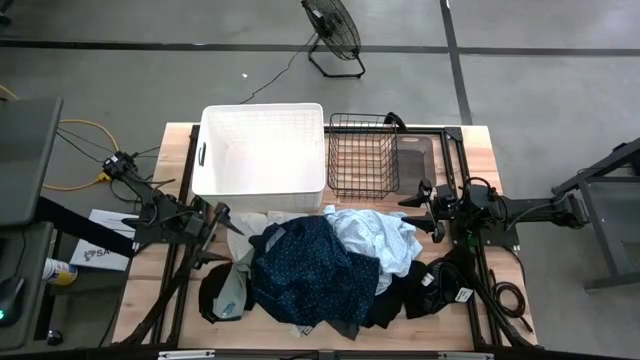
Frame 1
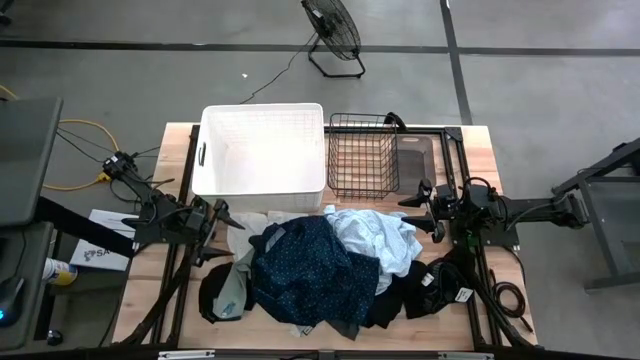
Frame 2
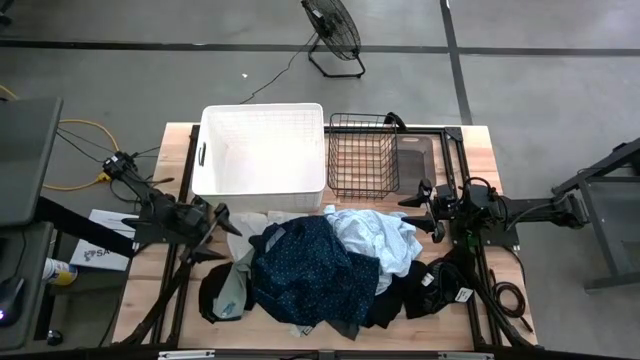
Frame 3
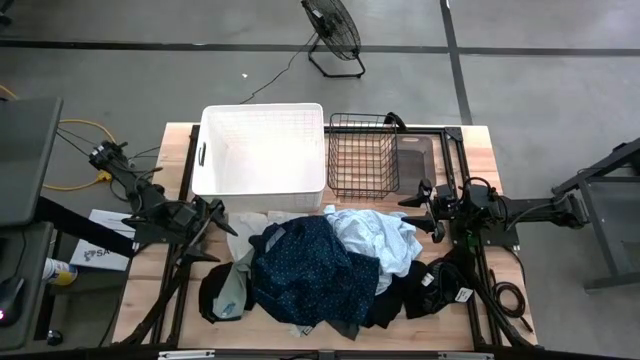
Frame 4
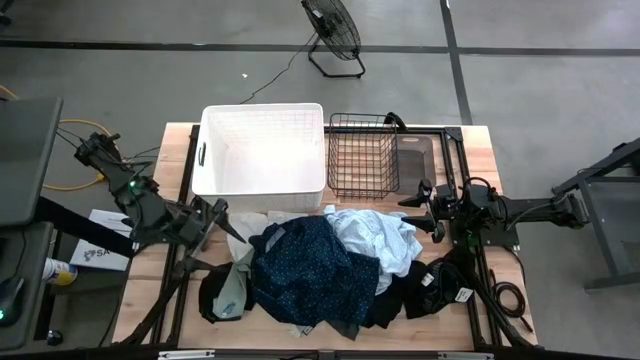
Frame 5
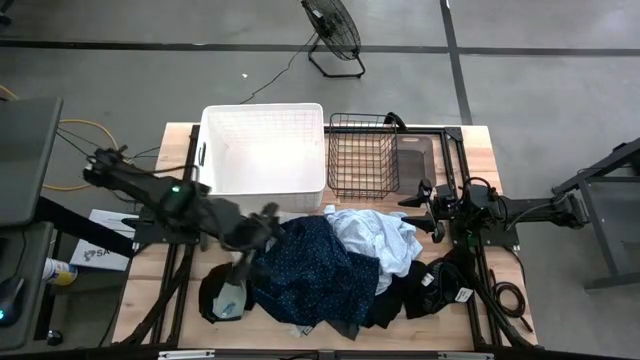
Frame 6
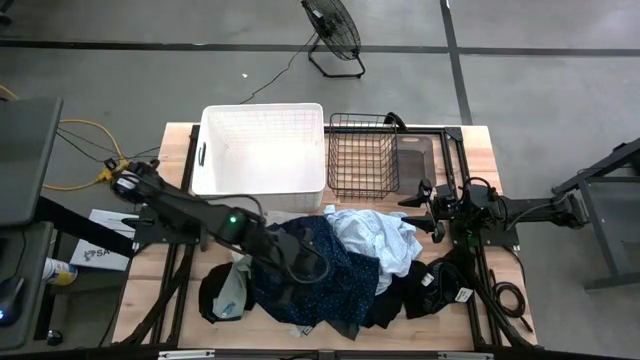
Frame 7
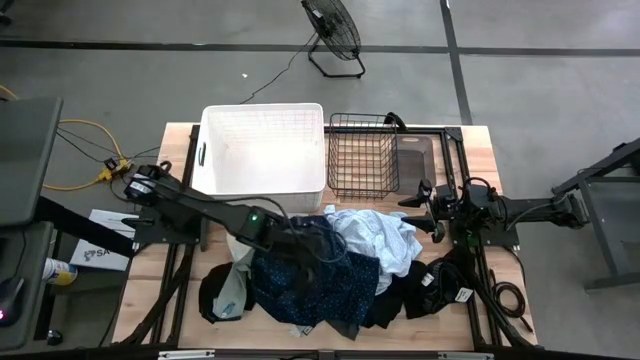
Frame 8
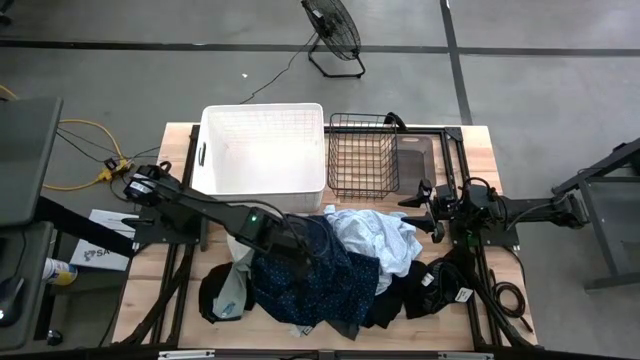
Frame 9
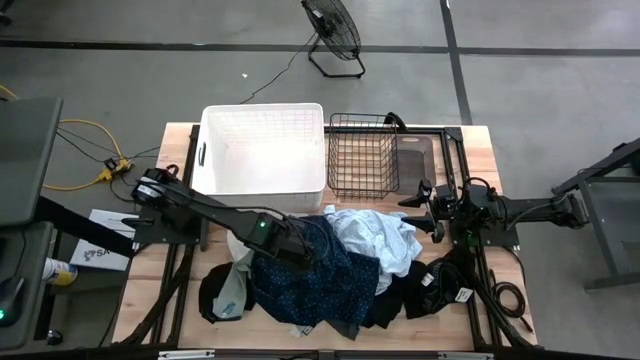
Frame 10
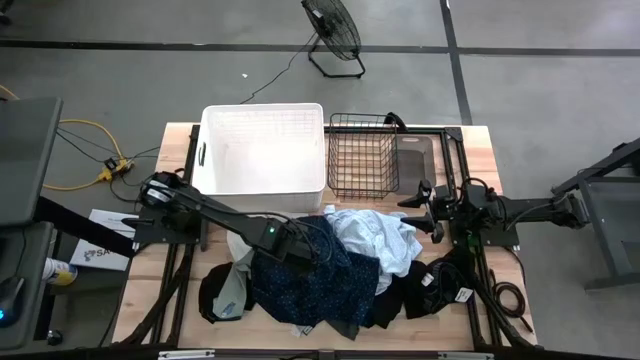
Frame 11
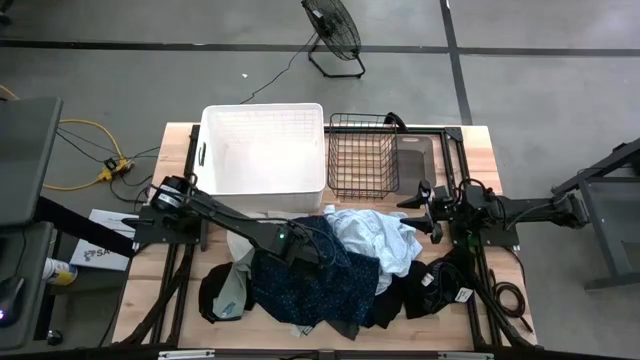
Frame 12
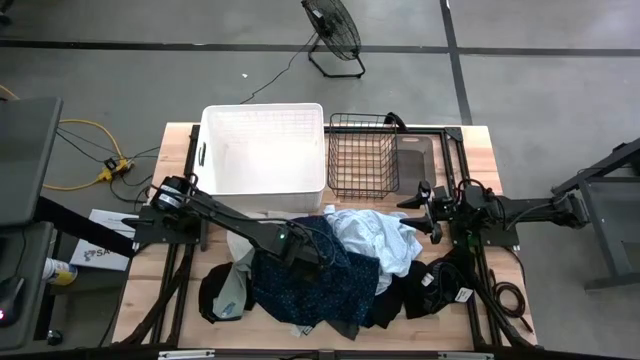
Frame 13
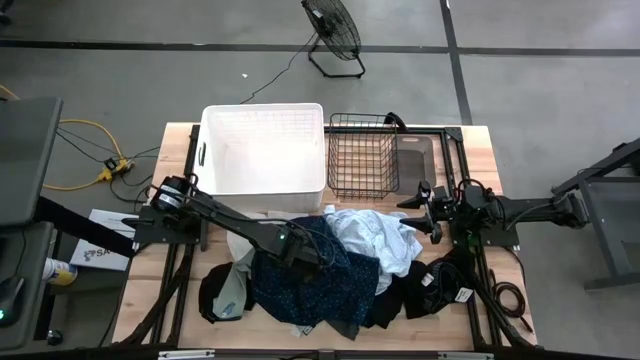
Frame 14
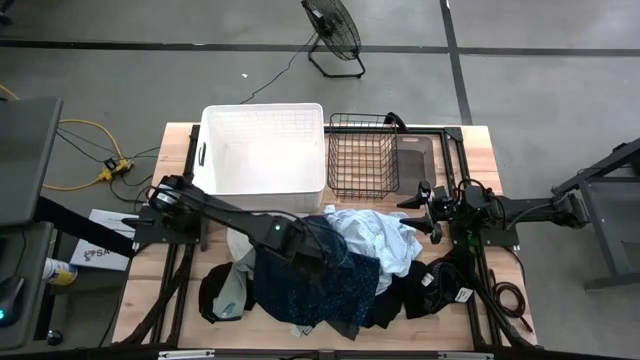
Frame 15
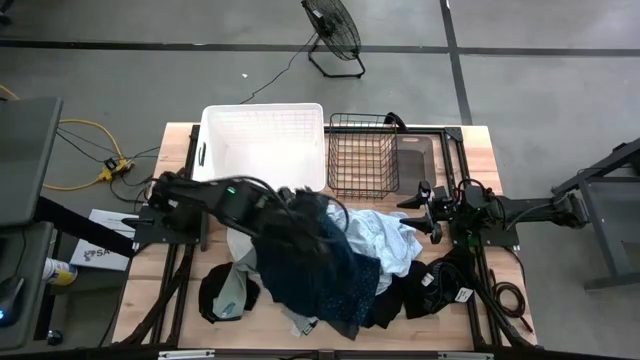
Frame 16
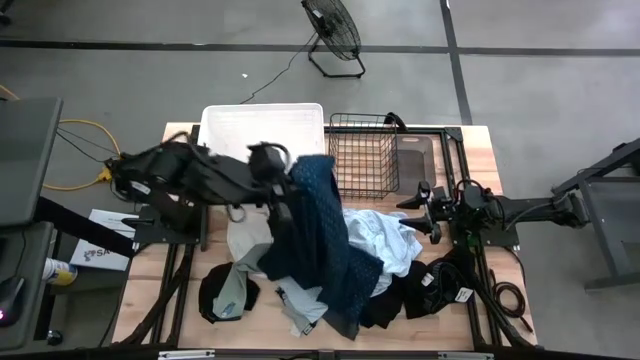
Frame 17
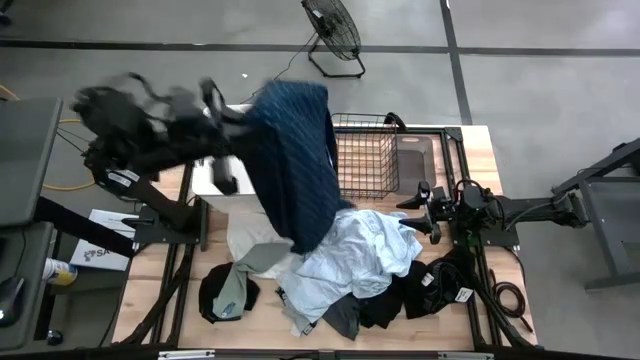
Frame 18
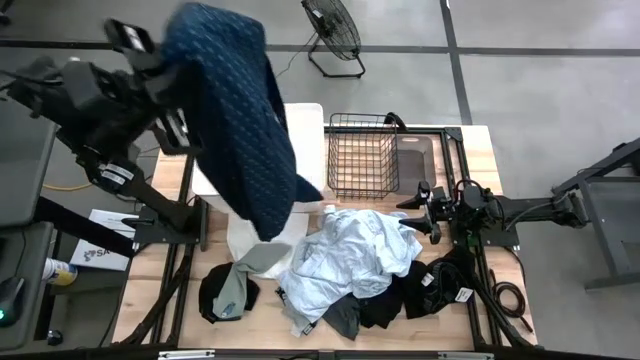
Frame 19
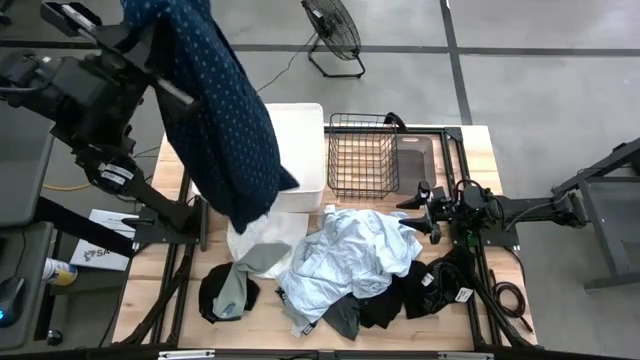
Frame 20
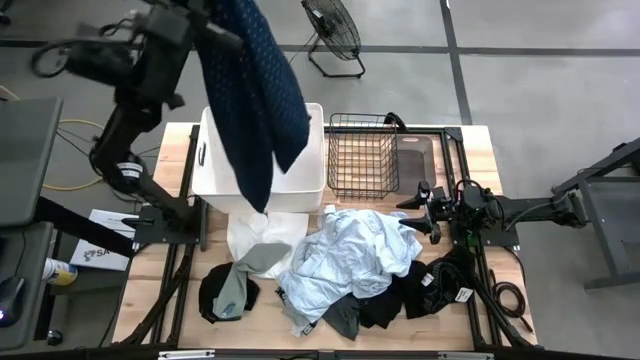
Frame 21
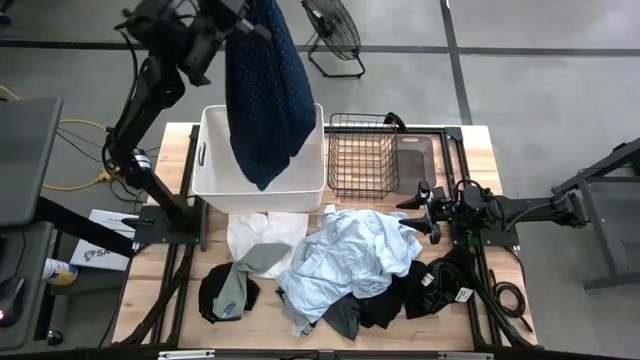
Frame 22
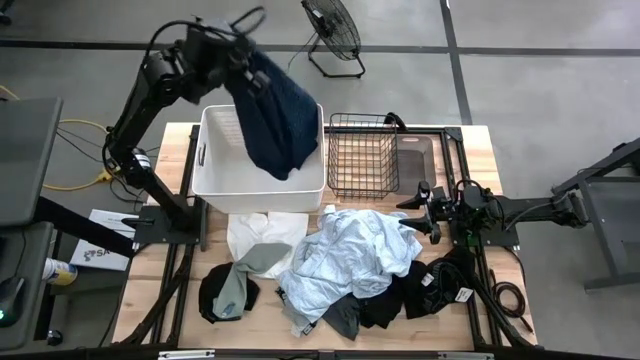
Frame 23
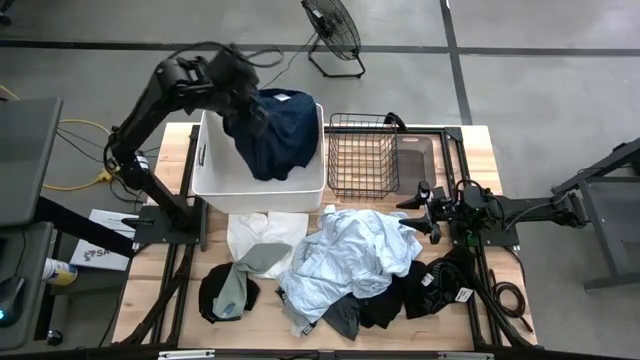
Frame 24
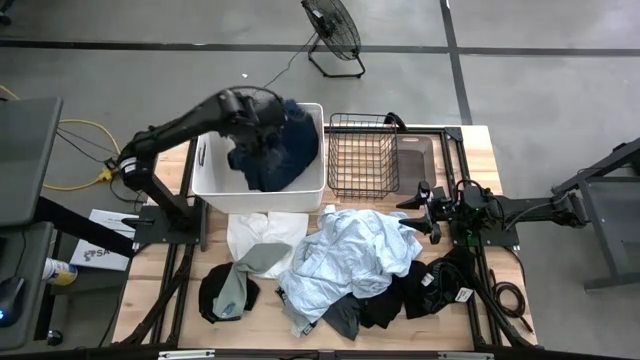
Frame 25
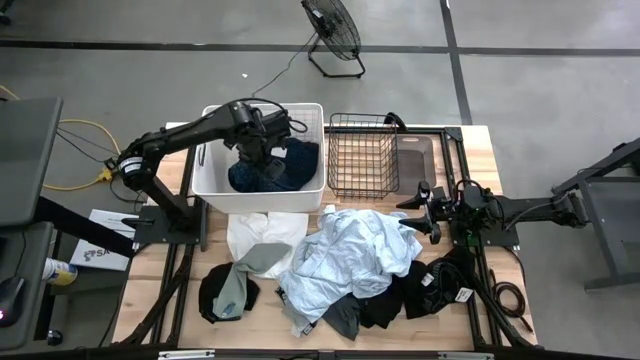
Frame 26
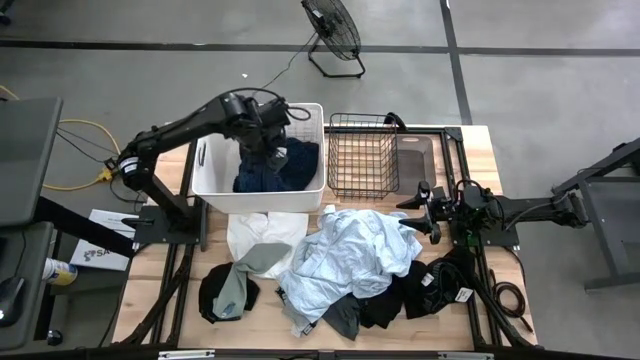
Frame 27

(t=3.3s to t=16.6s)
Task: Pick & Place Cloths
Put the dark blue shirt into the white laundry organizer

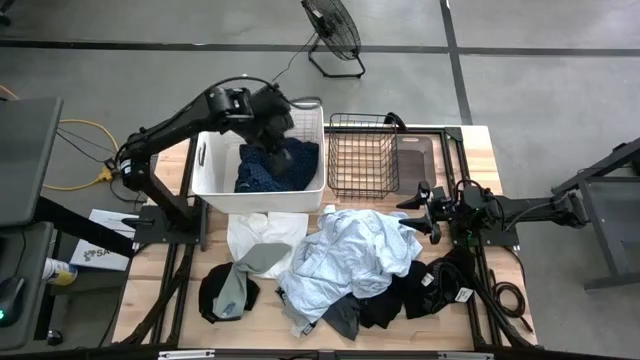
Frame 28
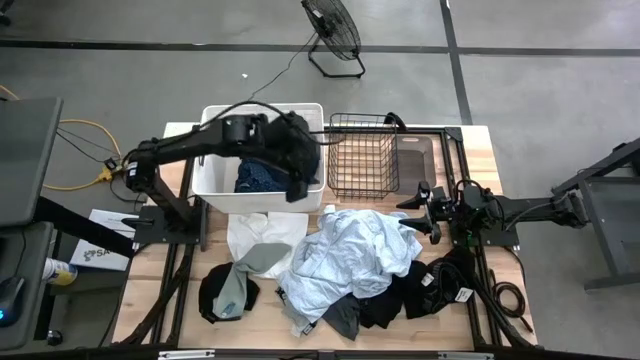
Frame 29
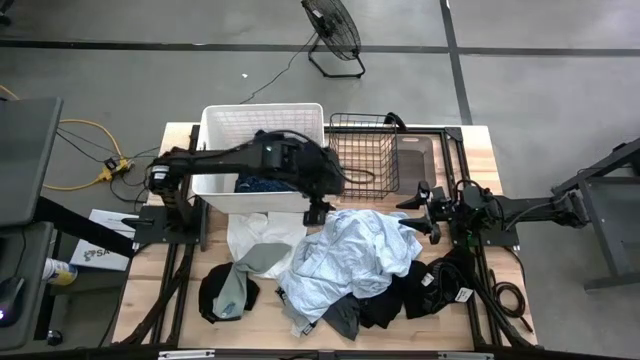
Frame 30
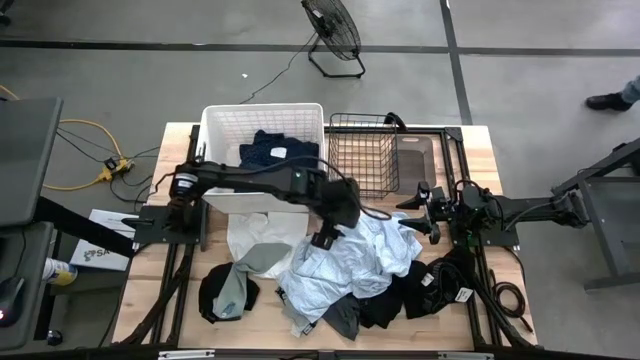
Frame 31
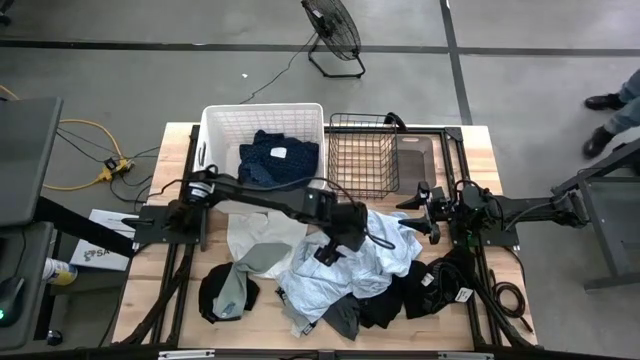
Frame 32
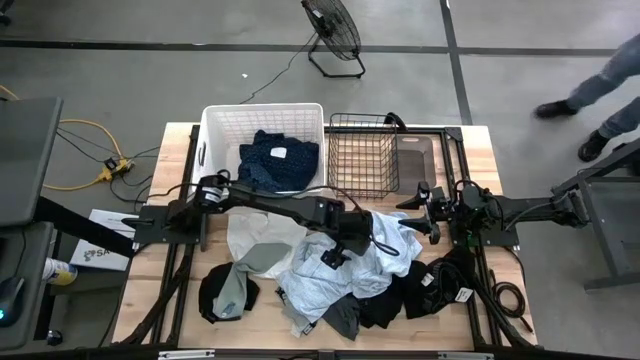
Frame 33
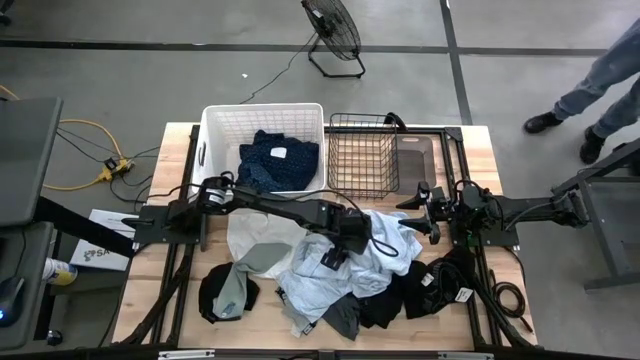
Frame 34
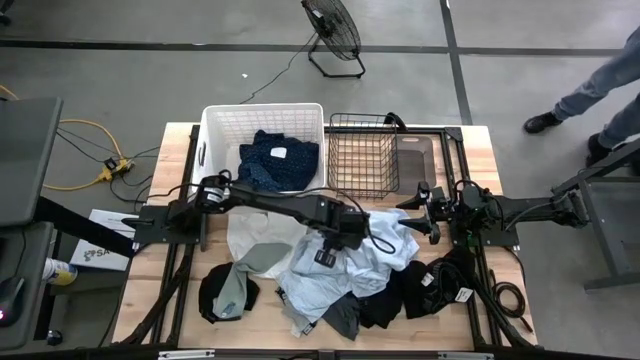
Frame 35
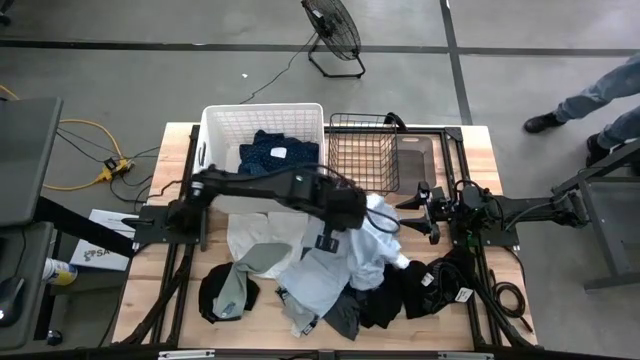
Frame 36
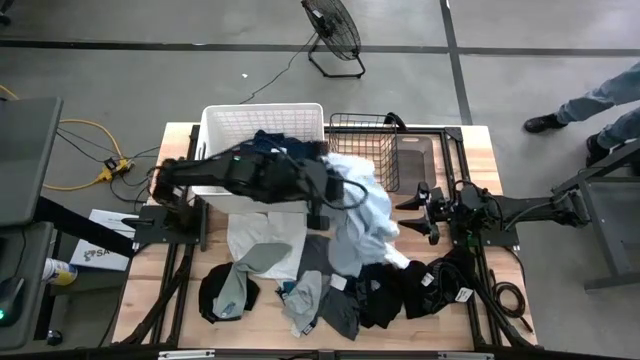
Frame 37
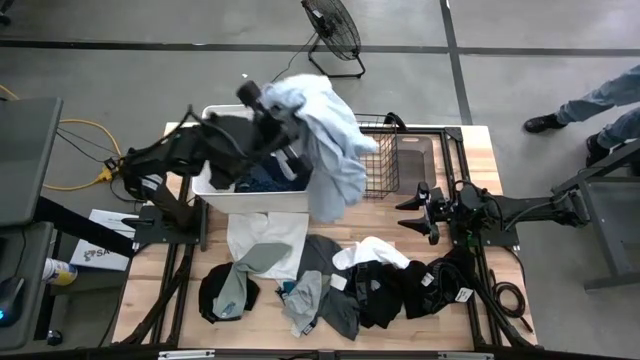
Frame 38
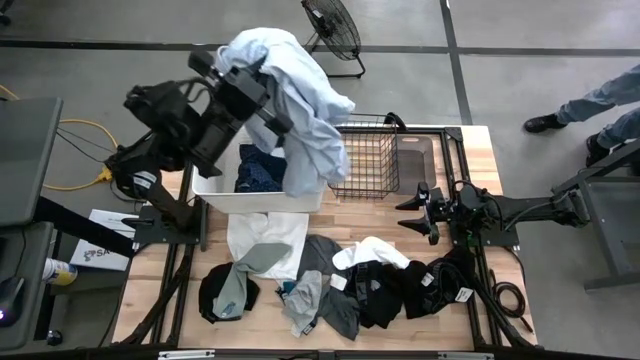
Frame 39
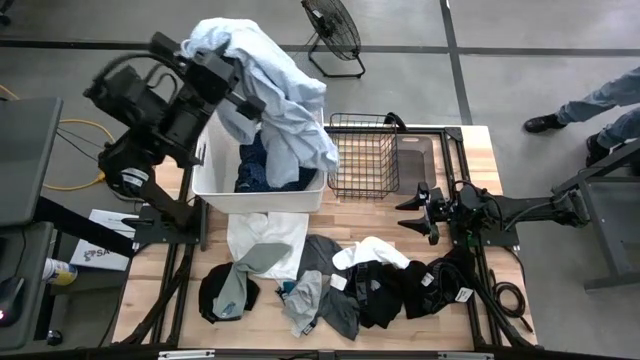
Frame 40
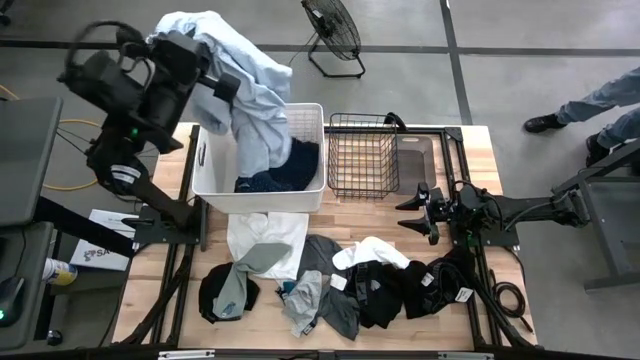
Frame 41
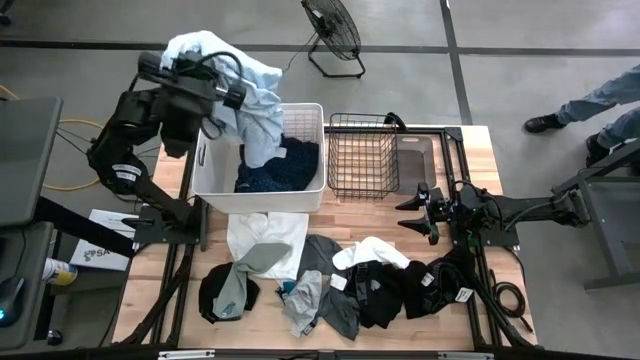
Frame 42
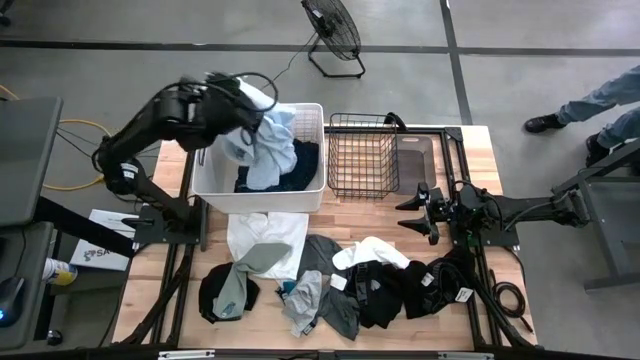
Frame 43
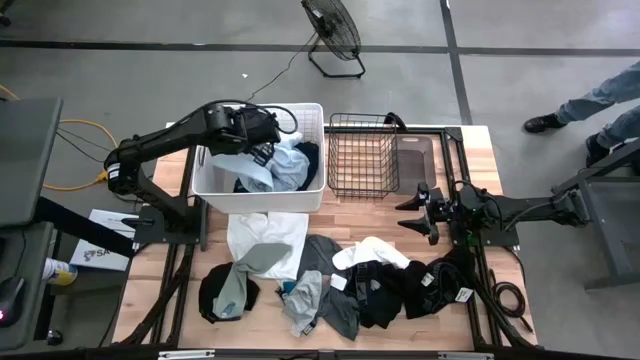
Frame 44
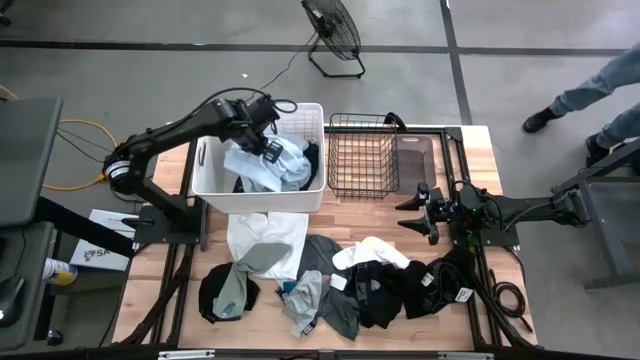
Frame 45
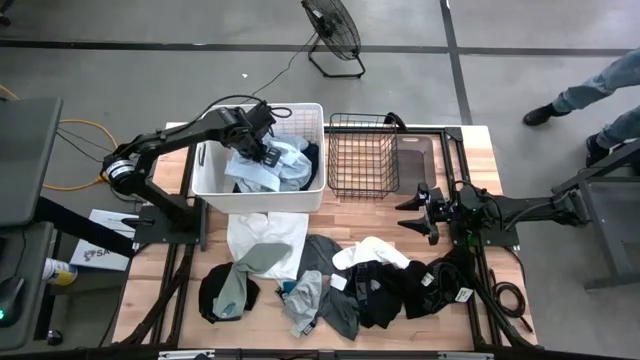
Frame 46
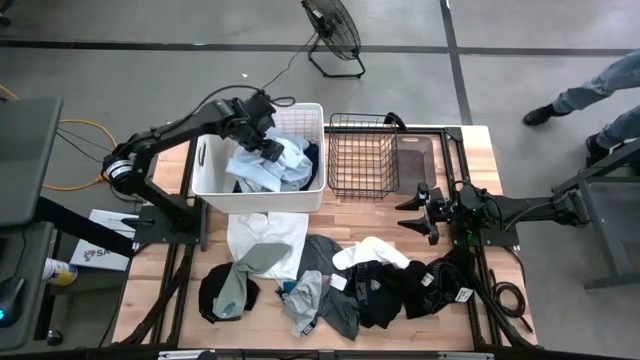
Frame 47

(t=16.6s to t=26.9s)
Put the light blue shirt into the white laundry organizer
